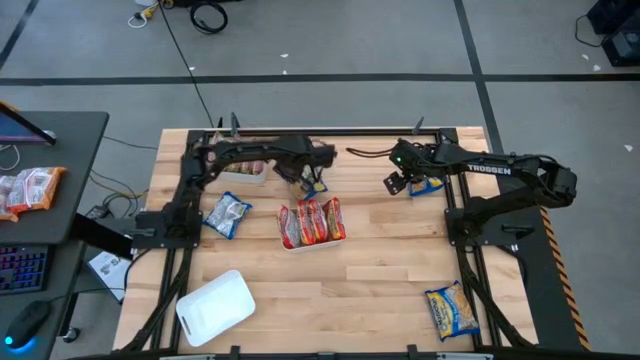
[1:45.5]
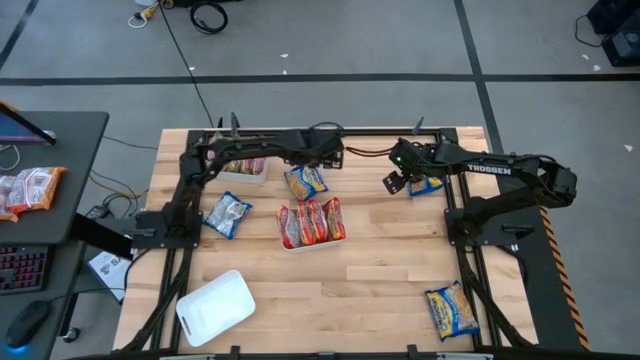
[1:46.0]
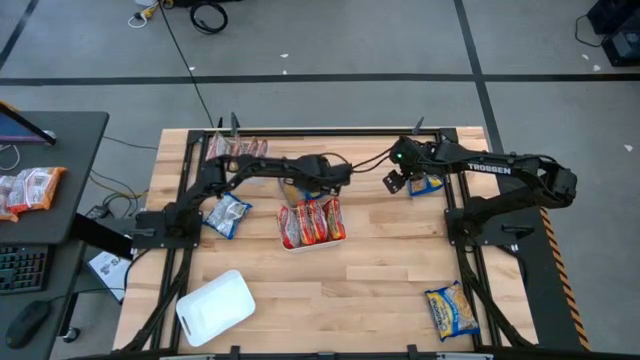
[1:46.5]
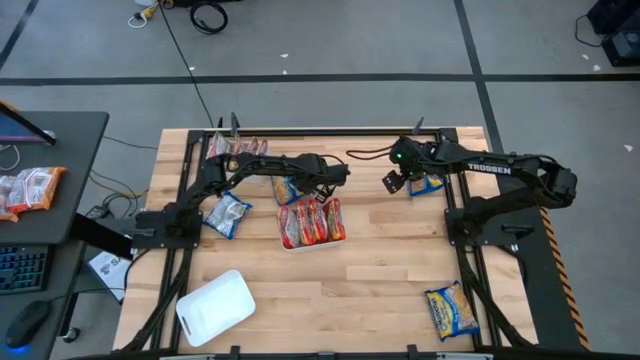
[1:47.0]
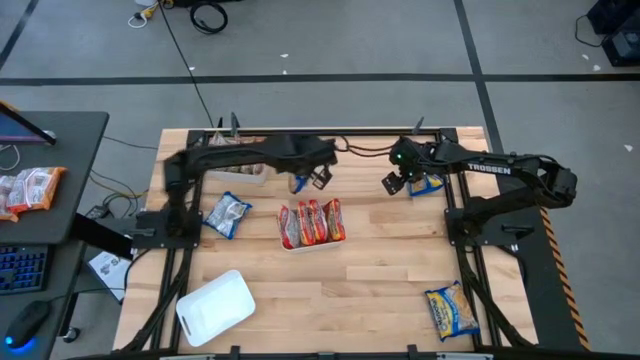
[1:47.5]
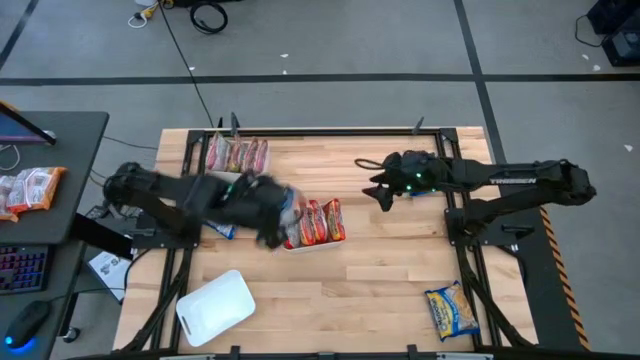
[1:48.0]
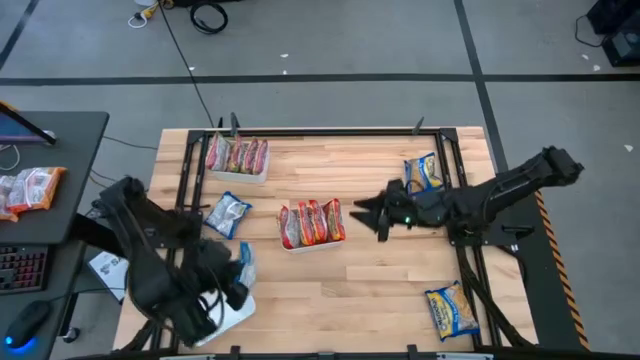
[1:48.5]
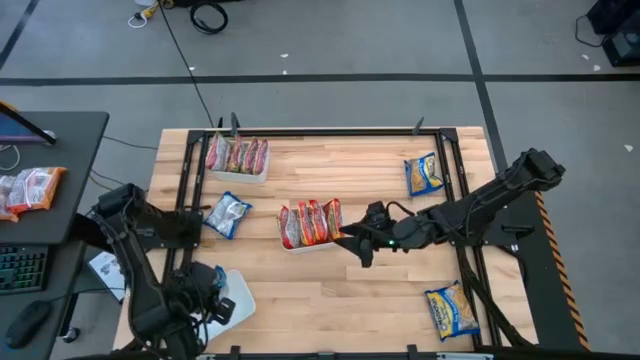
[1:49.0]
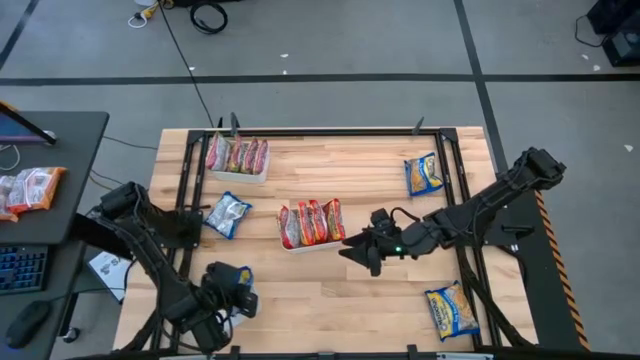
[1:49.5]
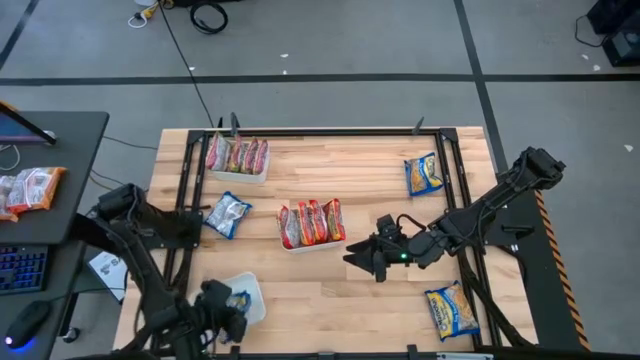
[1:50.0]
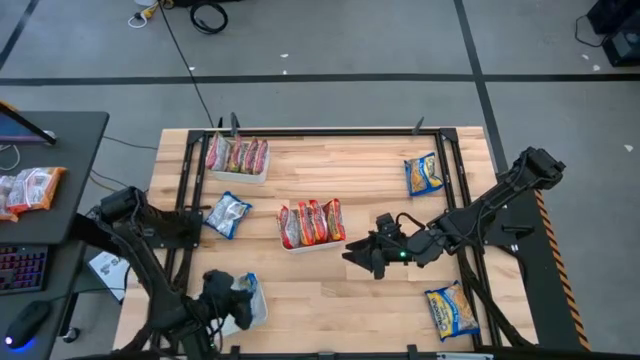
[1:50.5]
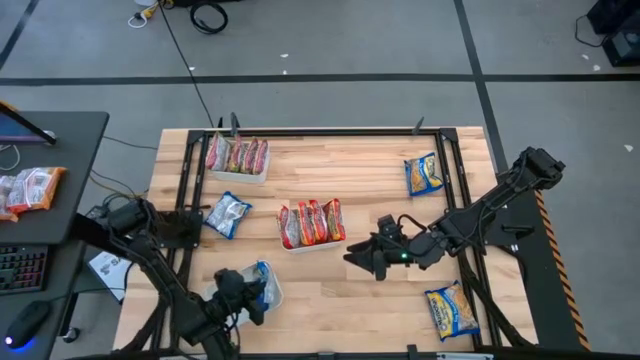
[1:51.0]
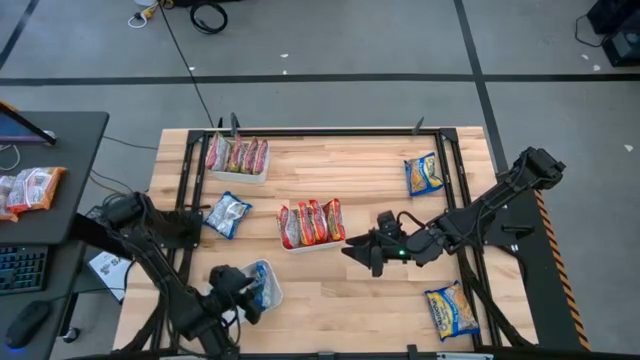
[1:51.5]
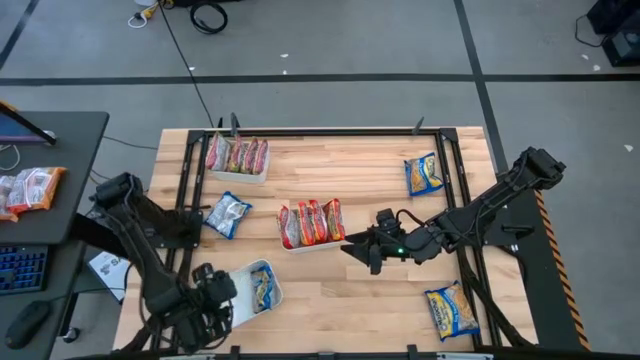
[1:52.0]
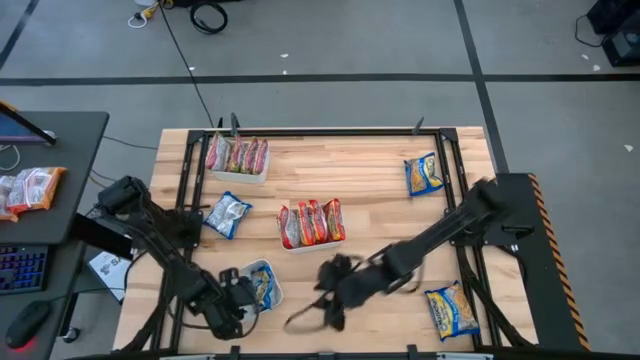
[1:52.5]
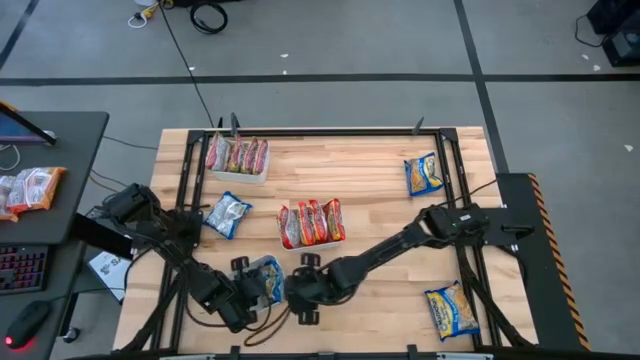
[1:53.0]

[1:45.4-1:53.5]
Task: Sort Maruchan noodles
Put the blue noodle pack into the bottom white bin

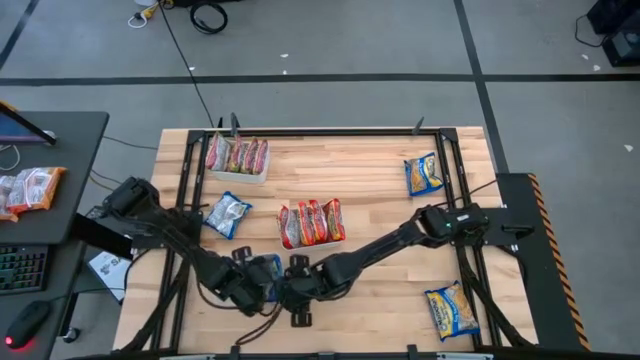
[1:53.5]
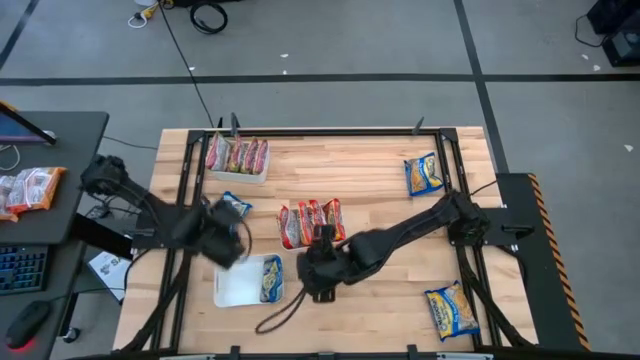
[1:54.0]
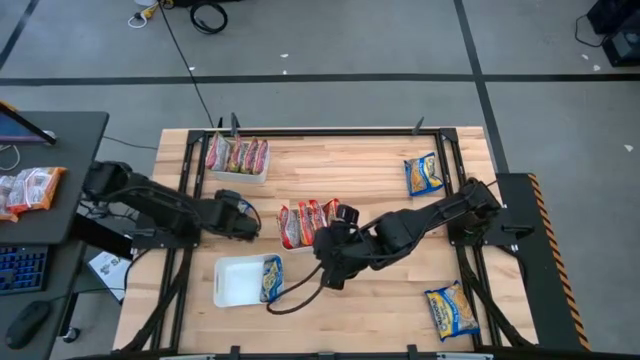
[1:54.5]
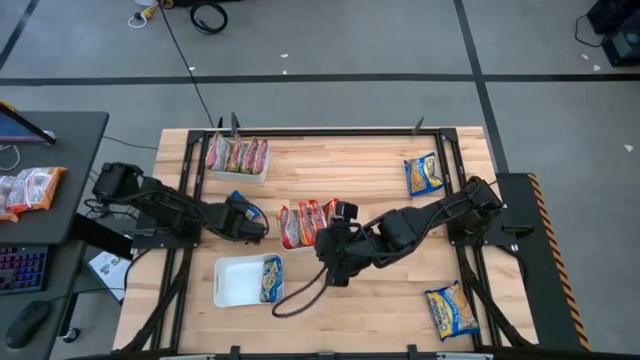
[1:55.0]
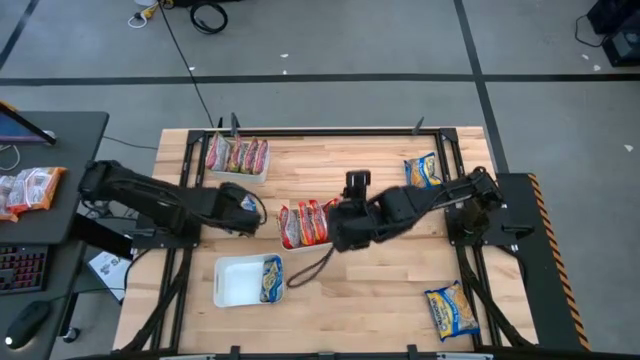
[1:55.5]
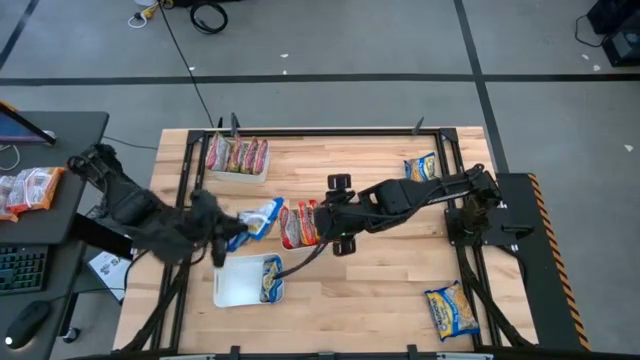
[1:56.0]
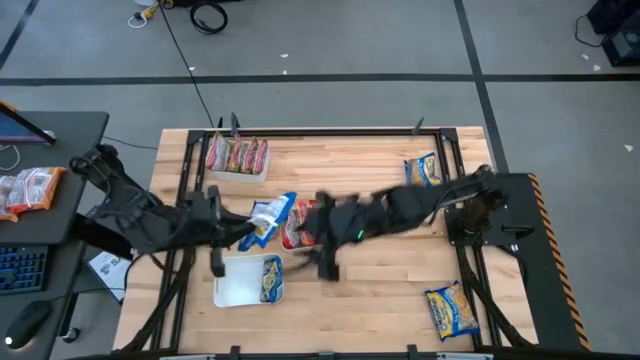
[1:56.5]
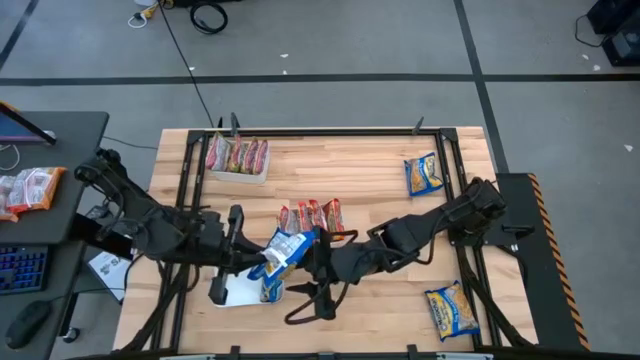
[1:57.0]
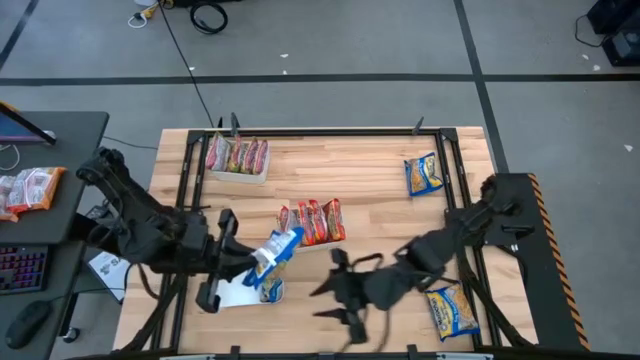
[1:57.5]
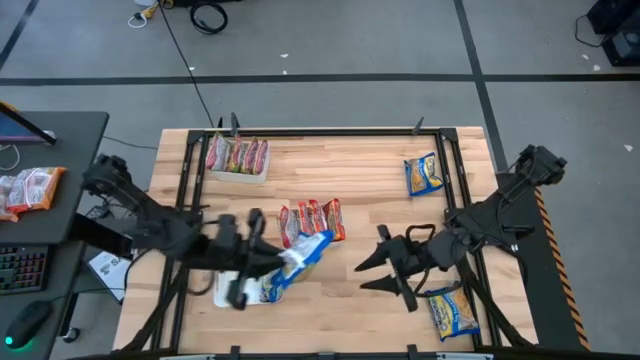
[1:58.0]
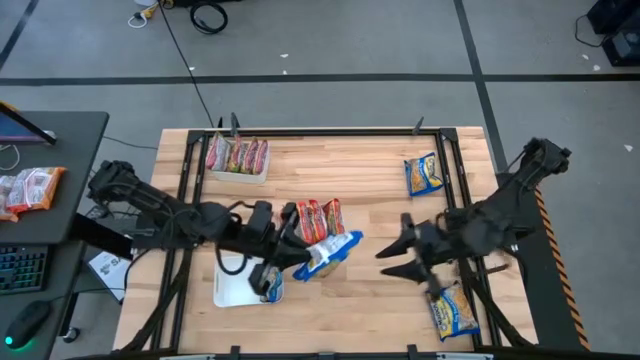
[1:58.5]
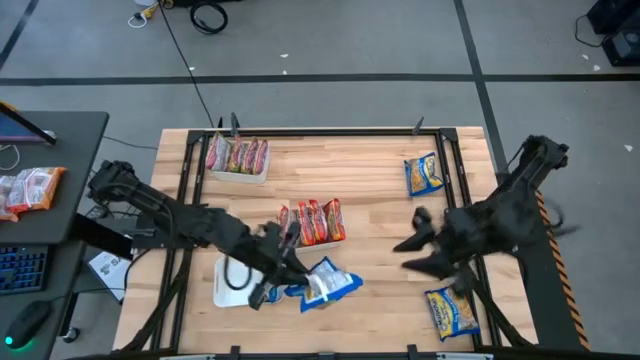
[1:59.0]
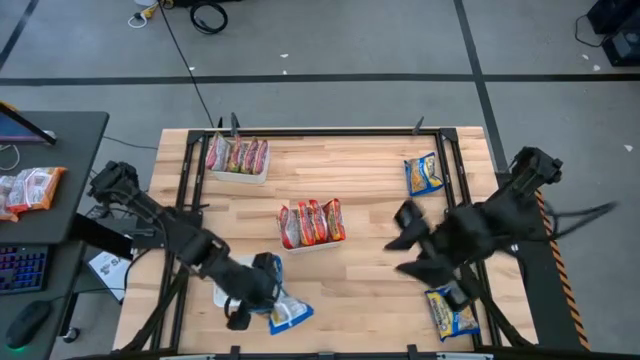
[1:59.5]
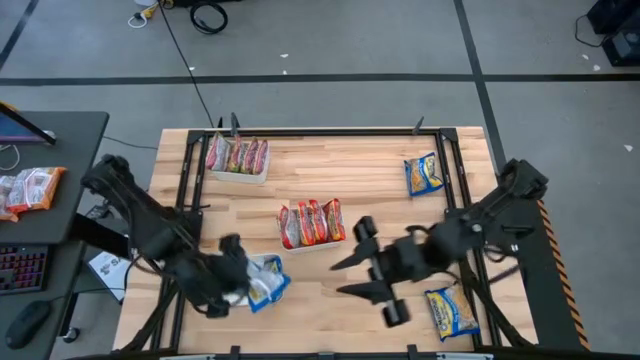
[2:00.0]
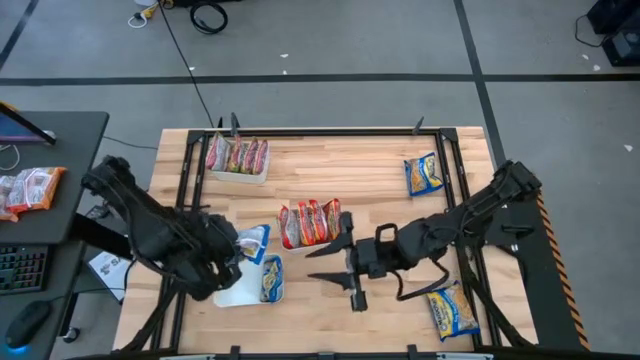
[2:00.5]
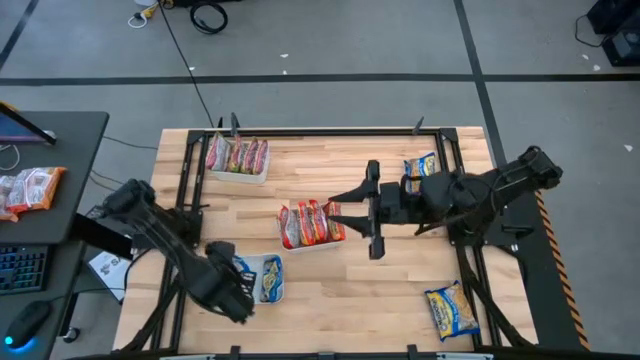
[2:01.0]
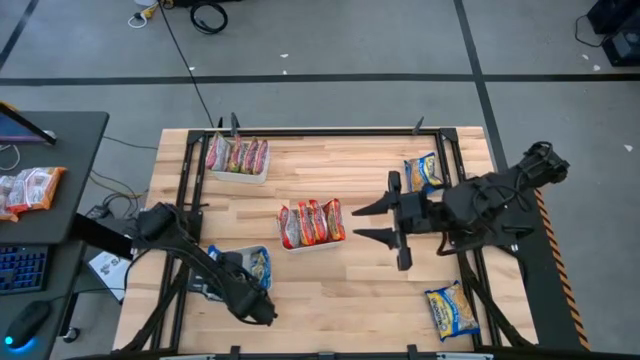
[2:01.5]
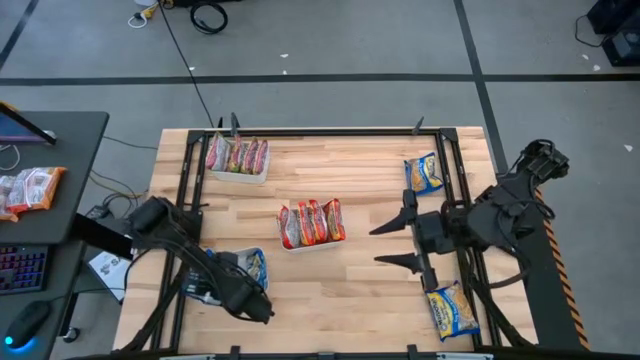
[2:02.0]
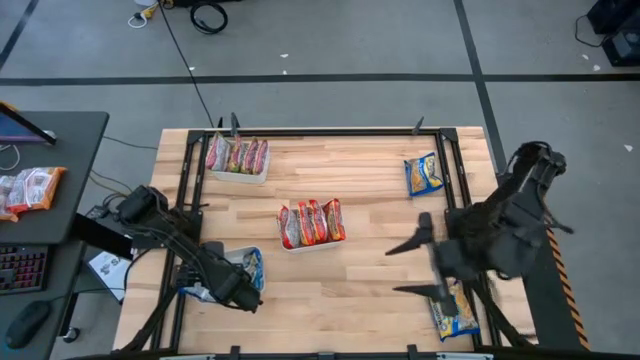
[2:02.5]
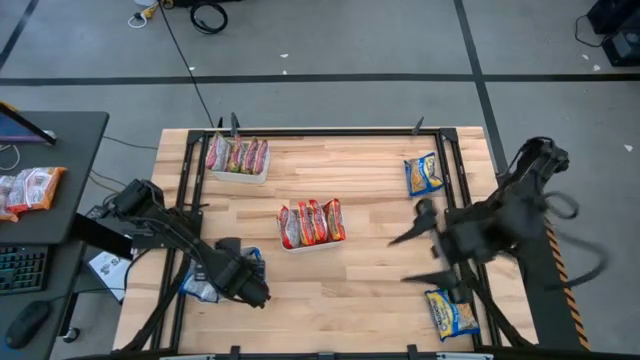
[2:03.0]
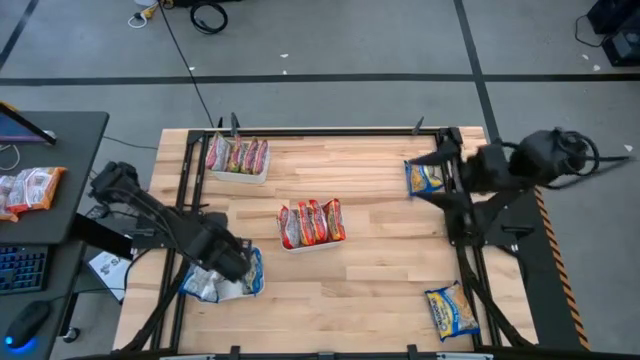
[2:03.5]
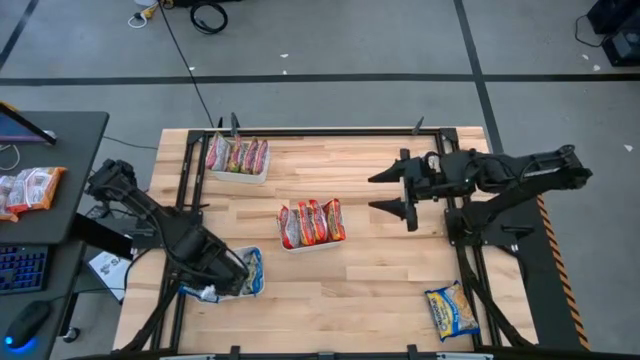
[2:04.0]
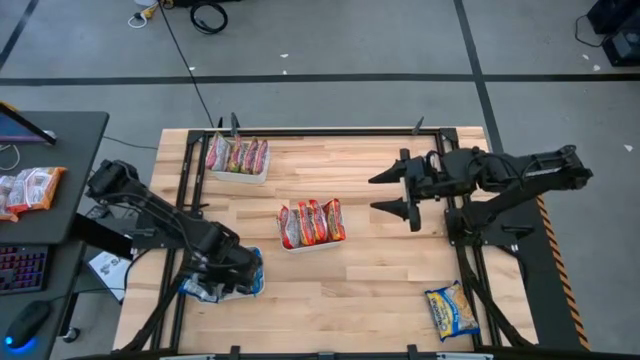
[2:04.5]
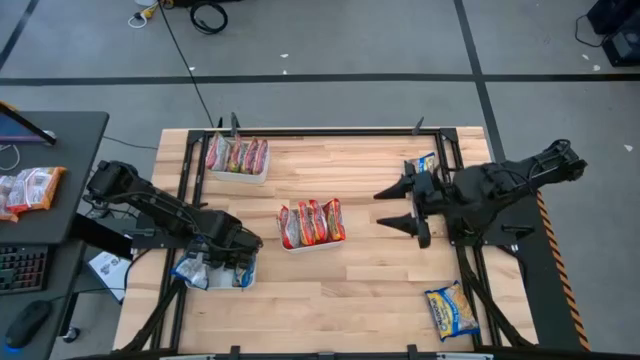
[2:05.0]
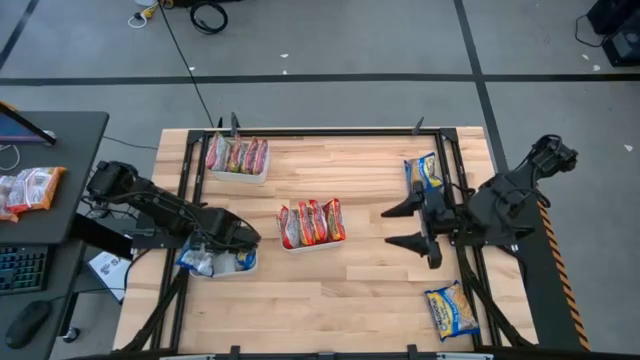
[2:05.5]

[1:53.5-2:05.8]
Put the blue noodle pack into the bottom white bin
